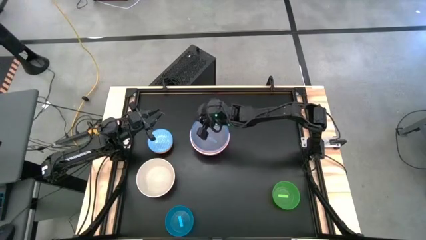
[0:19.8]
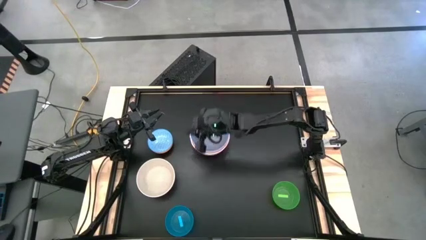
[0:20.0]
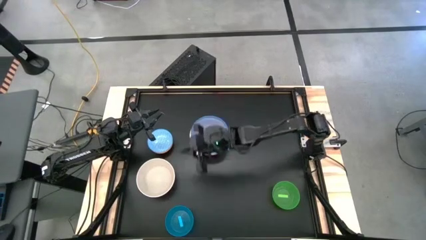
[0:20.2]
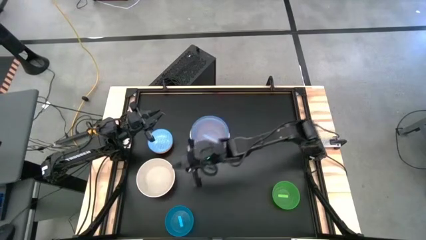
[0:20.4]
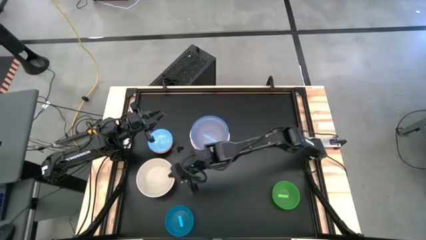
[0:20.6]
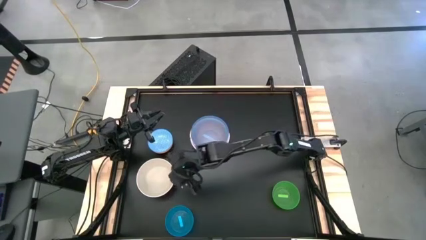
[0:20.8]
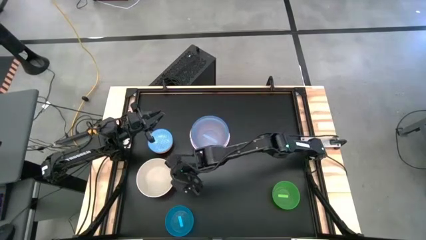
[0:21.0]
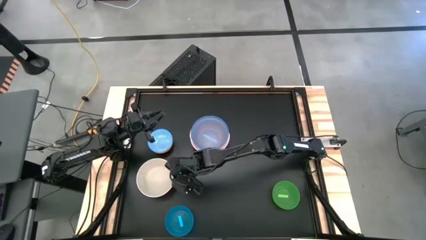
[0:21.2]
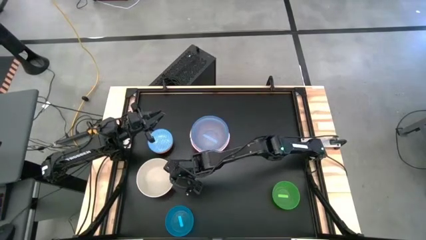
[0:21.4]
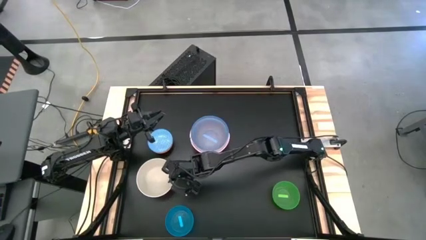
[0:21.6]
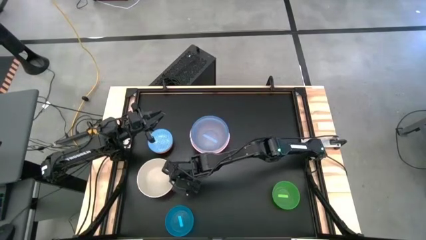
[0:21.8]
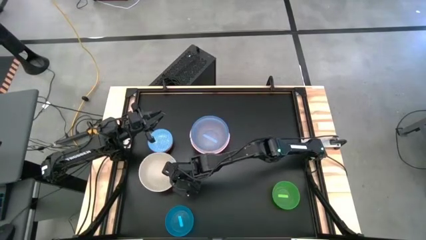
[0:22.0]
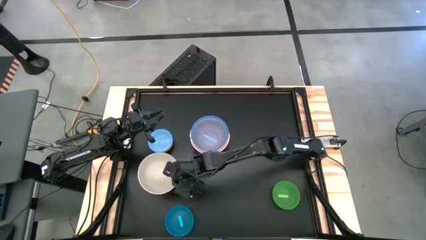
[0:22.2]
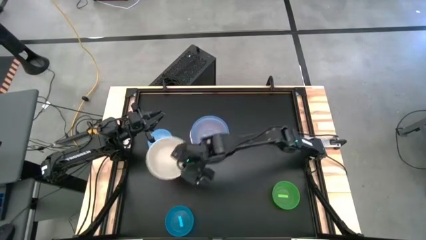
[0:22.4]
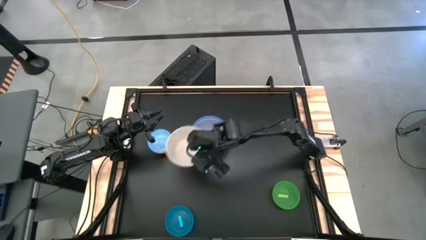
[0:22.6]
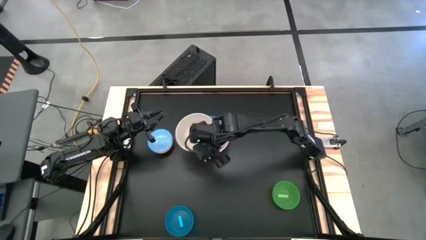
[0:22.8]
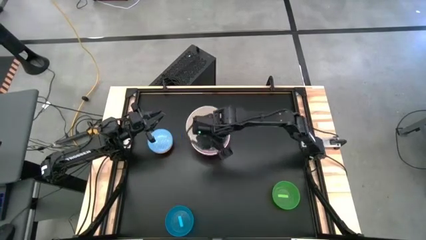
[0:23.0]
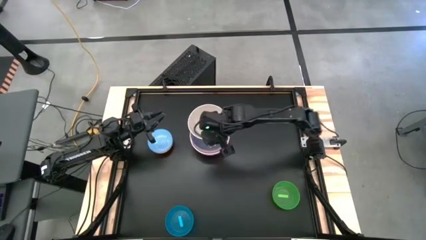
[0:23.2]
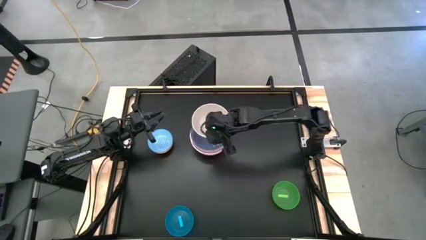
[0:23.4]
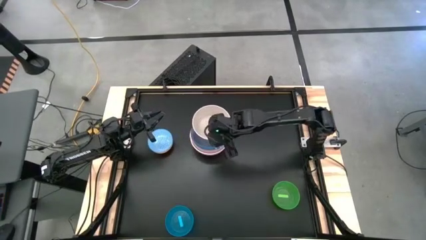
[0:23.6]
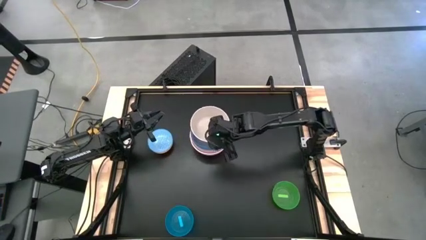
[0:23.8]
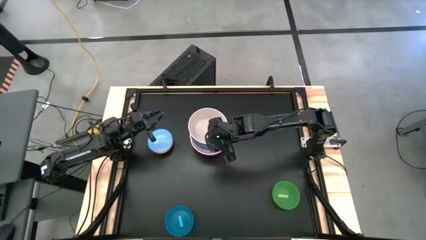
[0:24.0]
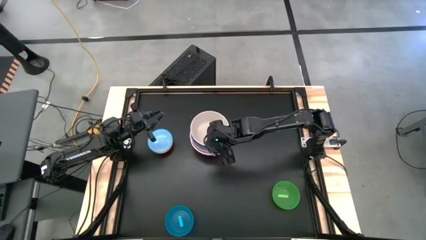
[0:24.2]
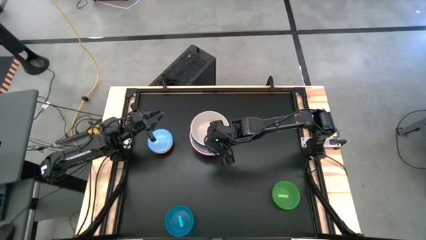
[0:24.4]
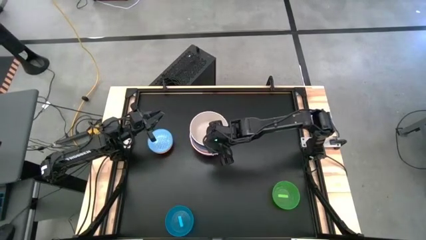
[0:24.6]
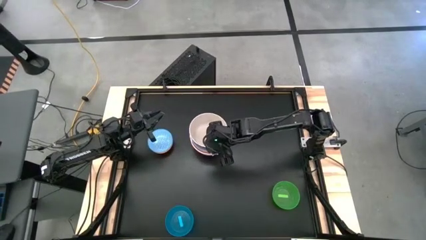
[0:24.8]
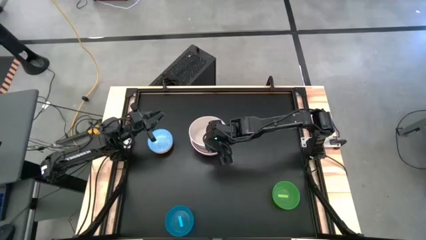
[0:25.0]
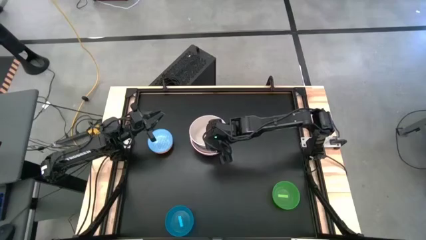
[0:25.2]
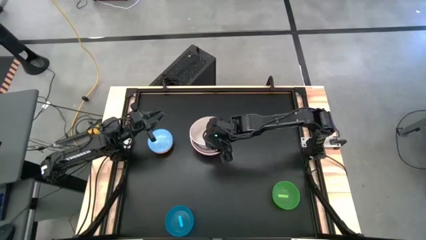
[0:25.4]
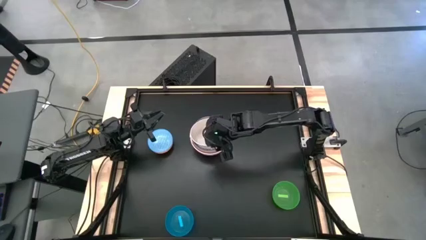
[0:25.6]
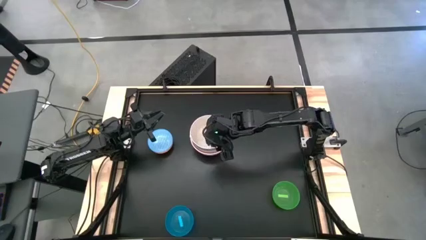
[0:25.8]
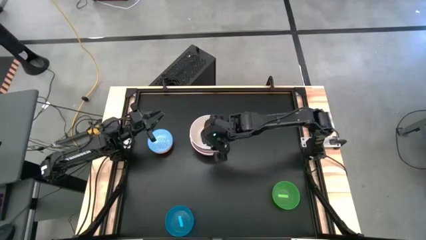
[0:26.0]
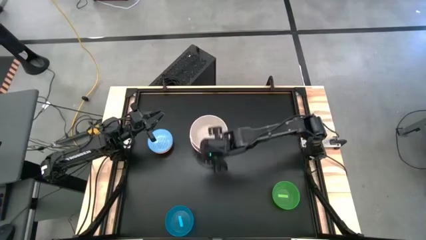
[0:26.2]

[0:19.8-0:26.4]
Stack the white bowl on top of the blue transparent bowl

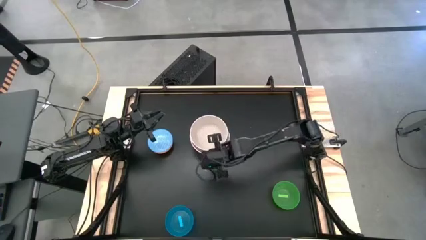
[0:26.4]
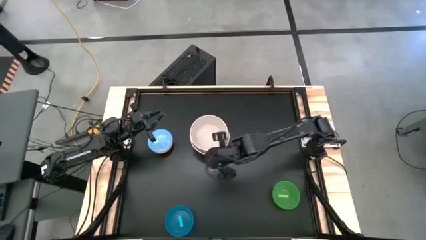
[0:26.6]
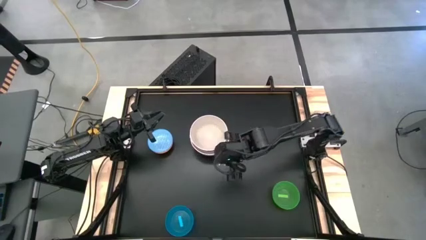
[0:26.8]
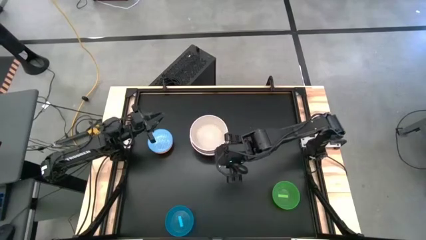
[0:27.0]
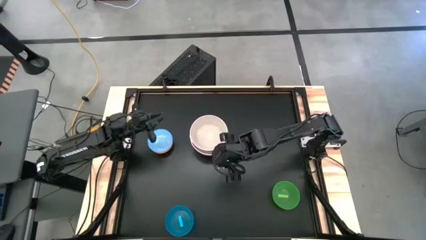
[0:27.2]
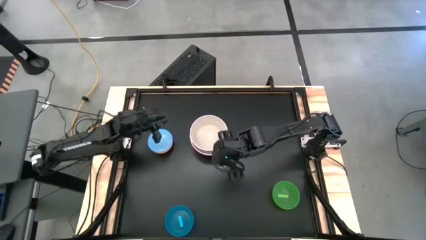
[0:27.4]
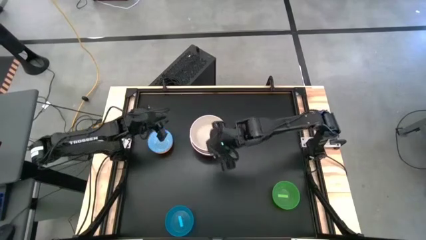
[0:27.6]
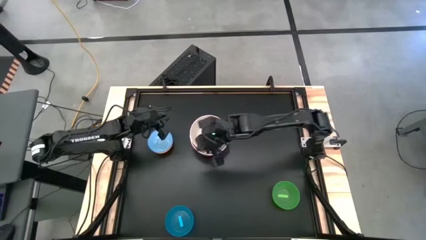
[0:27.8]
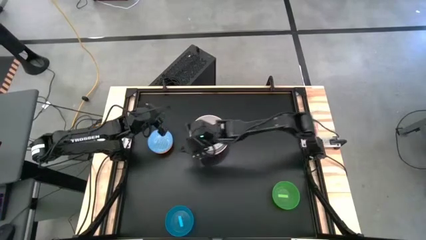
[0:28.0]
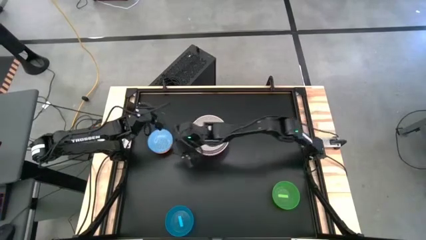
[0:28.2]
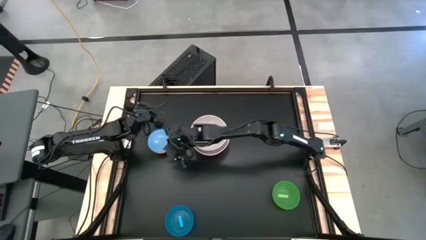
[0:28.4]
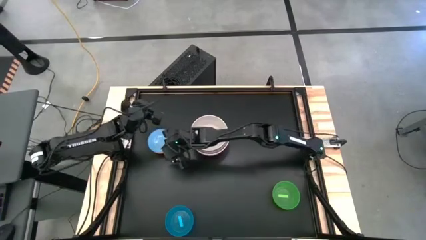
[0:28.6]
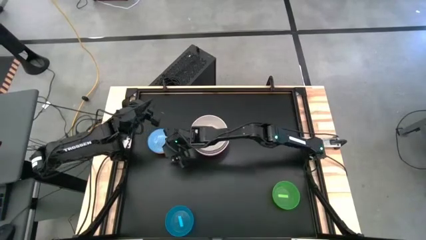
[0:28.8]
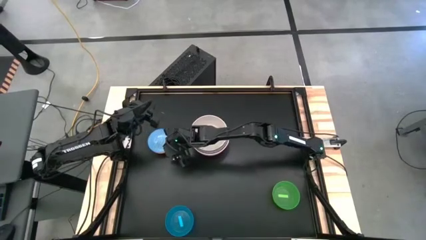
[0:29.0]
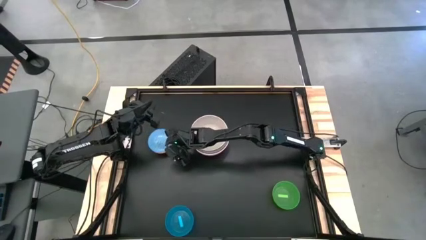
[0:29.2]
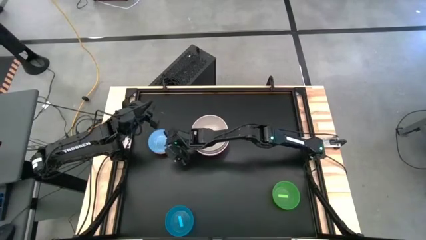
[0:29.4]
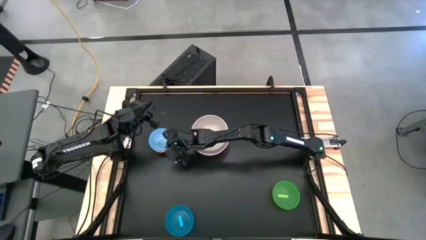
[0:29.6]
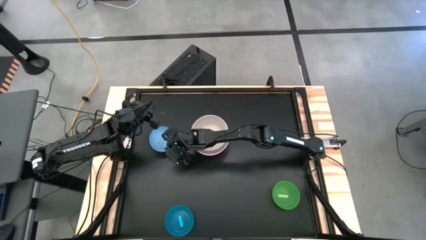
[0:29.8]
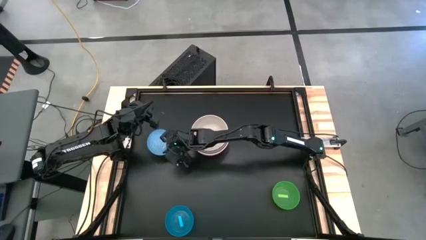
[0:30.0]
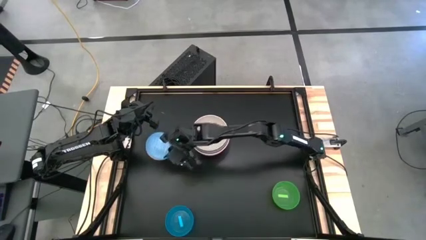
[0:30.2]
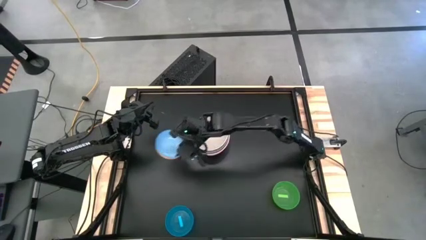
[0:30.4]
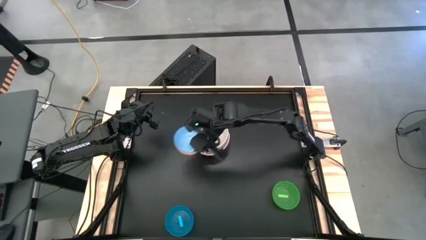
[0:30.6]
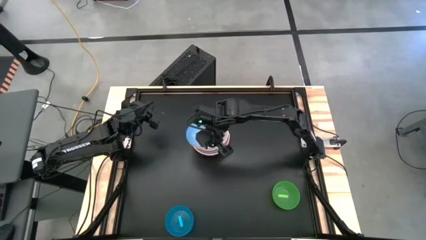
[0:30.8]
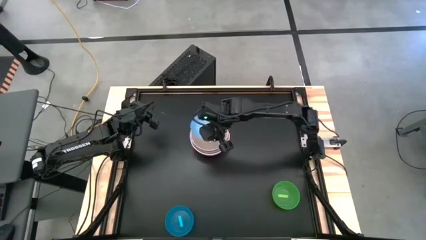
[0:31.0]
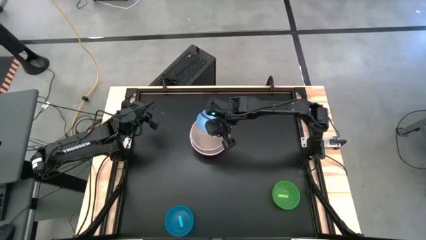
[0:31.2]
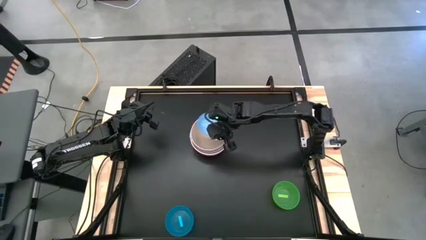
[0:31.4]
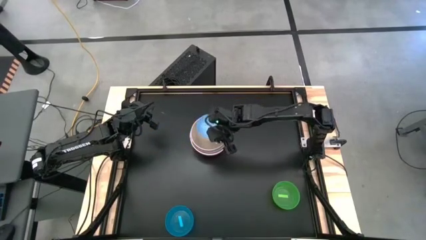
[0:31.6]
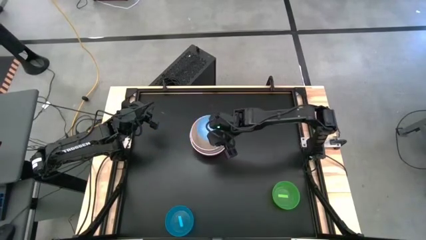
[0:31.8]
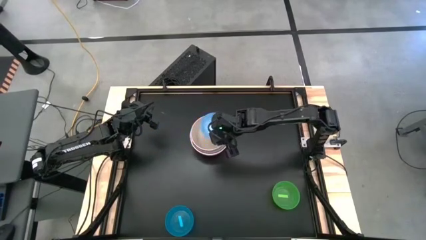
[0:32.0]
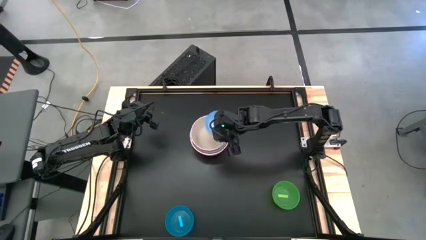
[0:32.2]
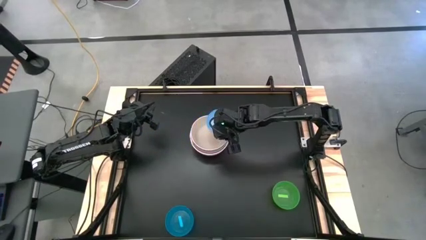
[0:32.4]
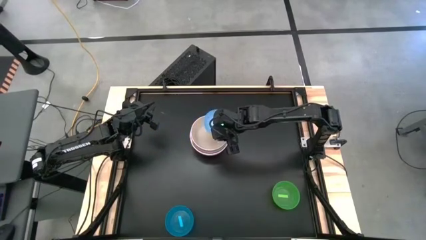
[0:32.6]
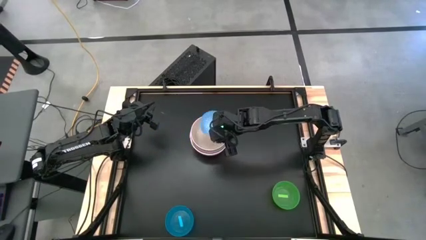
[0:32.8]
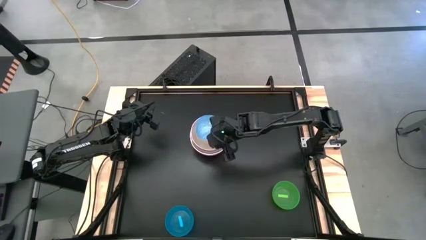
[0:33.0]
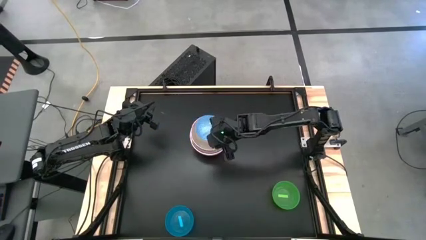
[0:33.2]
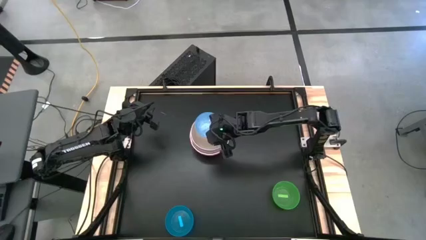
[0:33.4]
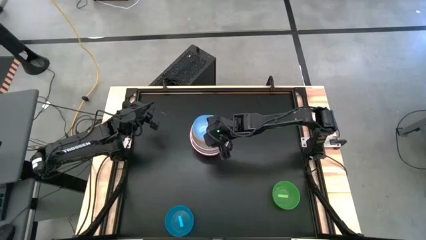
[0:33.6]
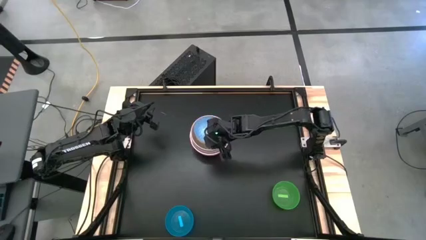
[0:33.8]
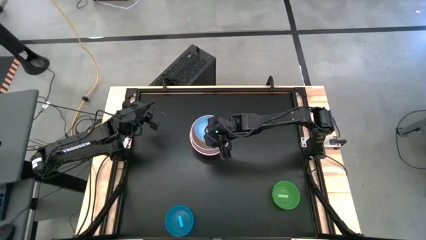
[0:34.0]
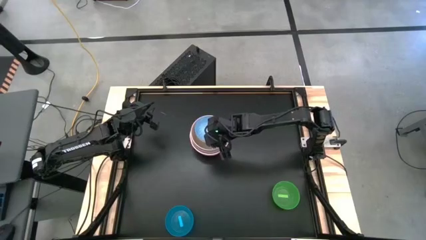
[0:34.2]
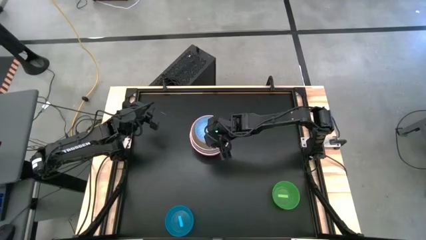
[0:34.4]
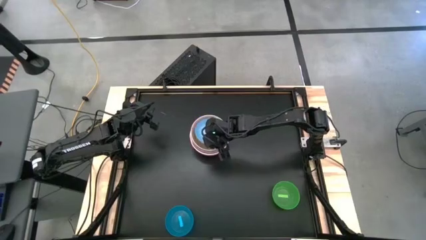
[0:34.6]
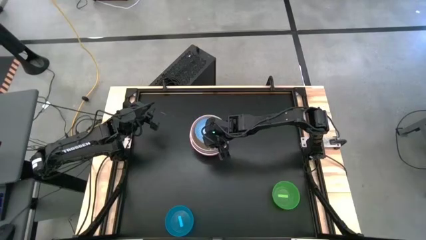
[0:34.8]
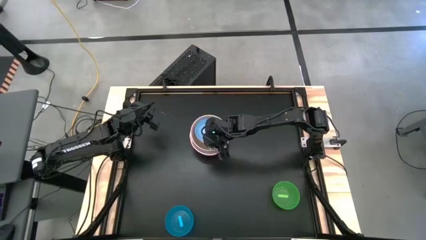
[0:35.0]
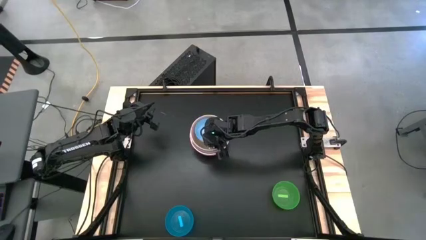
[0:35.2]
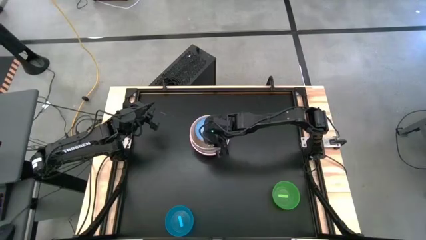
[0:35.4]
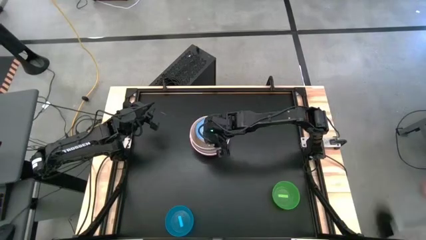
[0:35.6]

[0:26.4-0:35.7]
Stack the light blue bowl on top of the white bowl

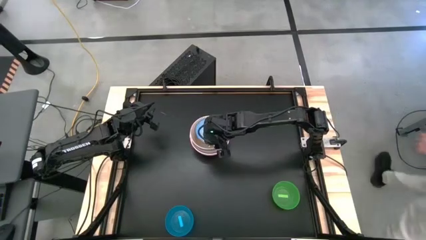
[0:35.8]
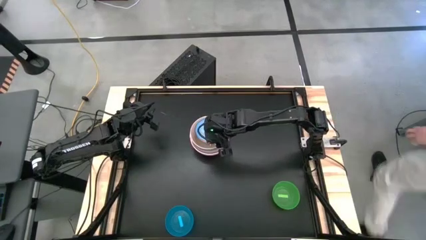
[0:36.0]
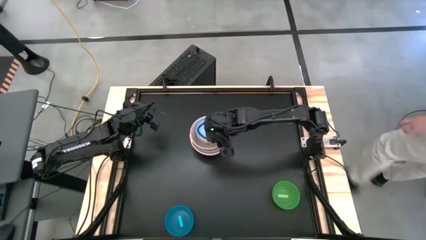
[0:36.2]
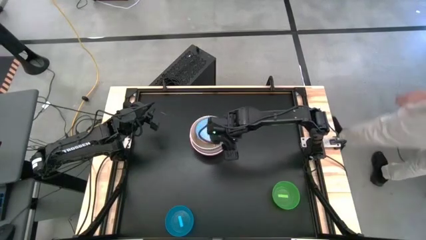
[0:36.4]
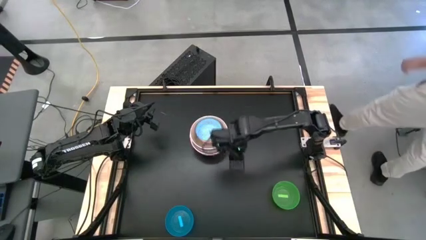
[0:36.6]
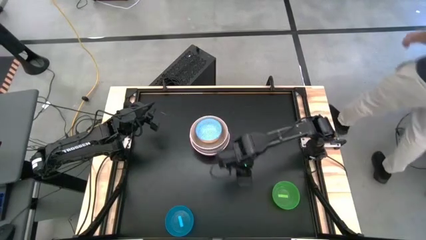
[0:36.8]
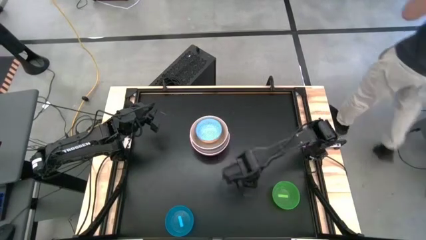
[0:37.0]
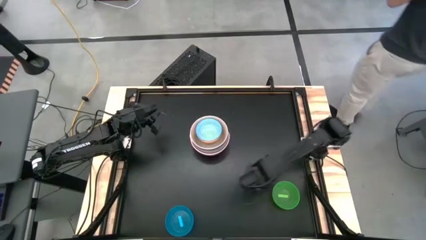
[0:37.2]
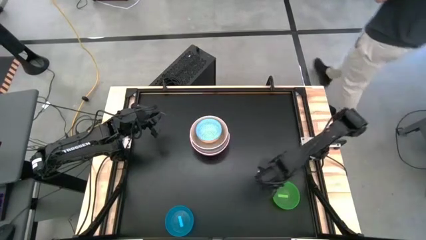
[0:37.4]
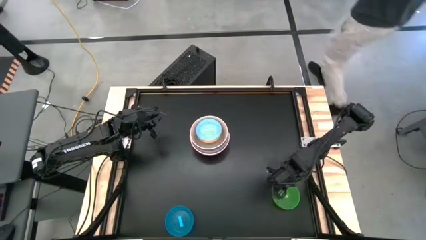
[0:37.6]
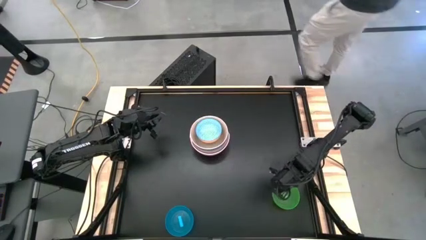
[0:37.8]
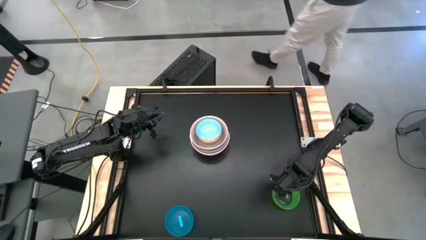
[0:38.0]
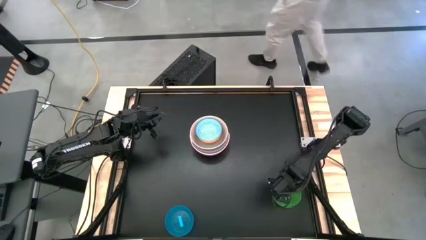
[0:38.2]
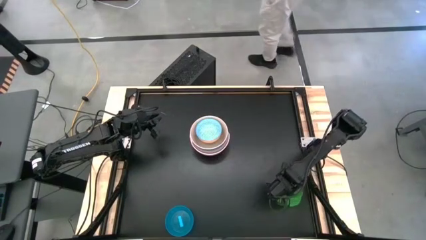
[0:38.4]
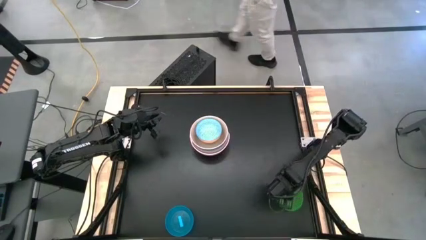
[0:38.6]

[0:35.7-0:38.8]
Stack the green transparent bowl on top of the light blue bowl
